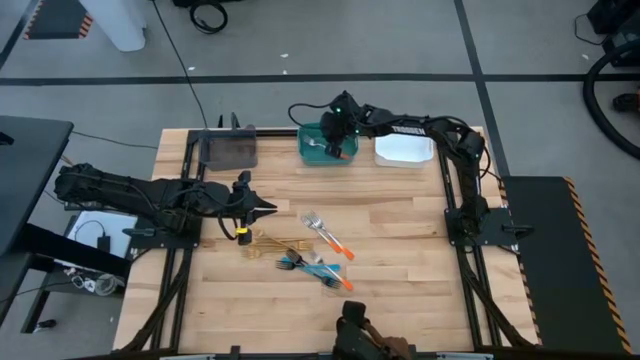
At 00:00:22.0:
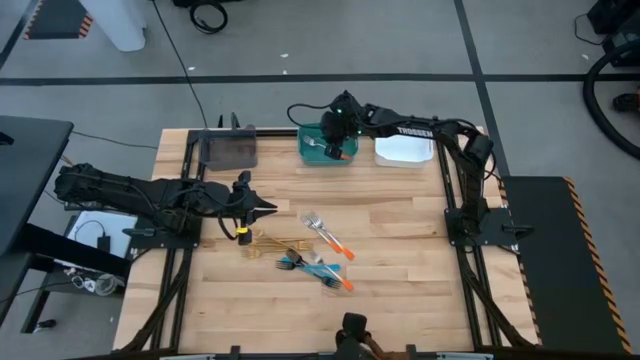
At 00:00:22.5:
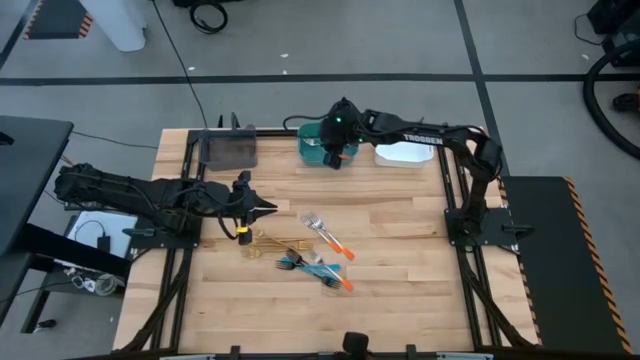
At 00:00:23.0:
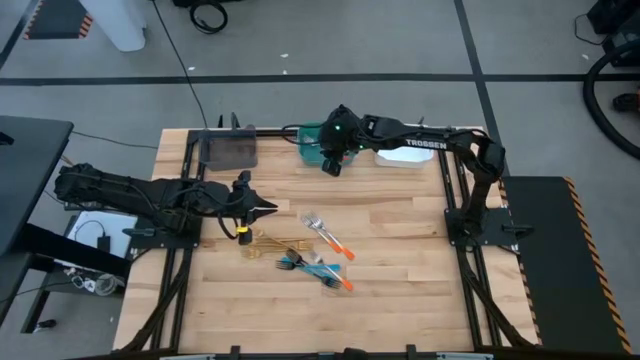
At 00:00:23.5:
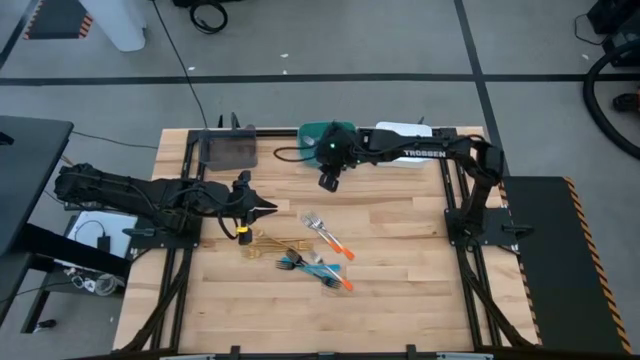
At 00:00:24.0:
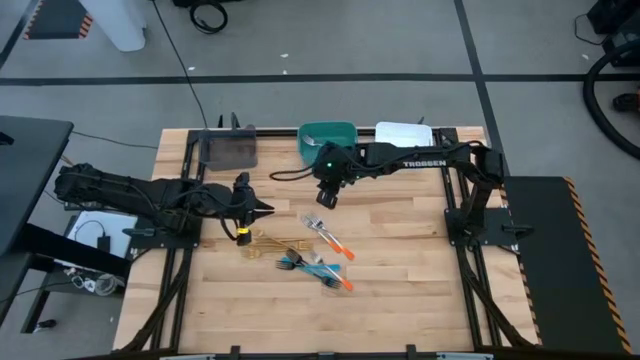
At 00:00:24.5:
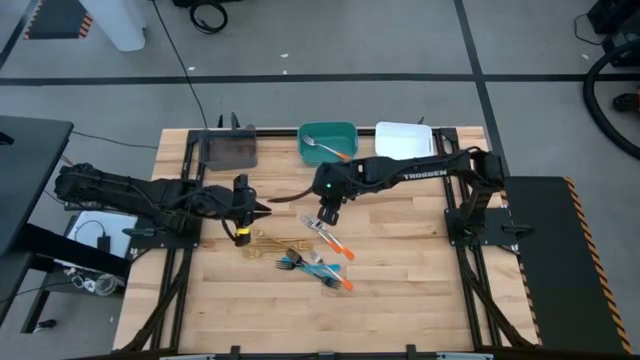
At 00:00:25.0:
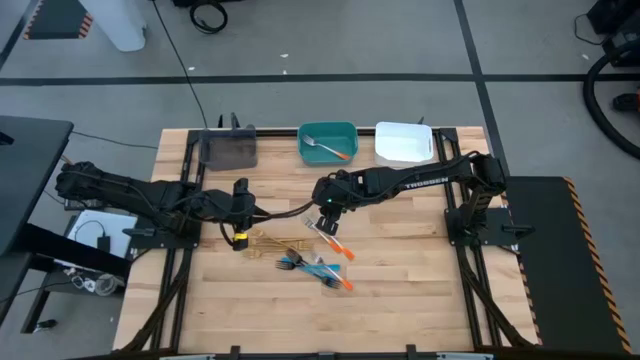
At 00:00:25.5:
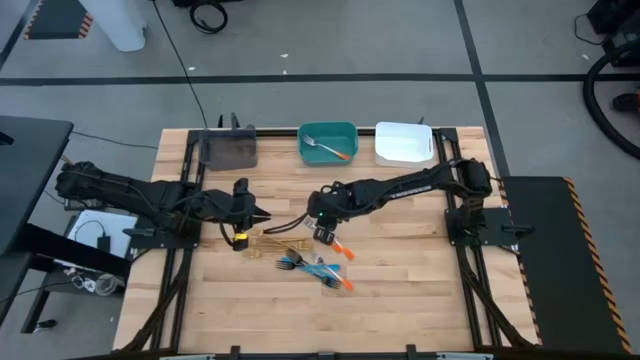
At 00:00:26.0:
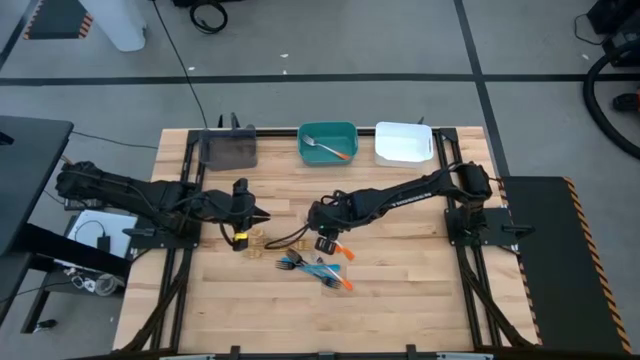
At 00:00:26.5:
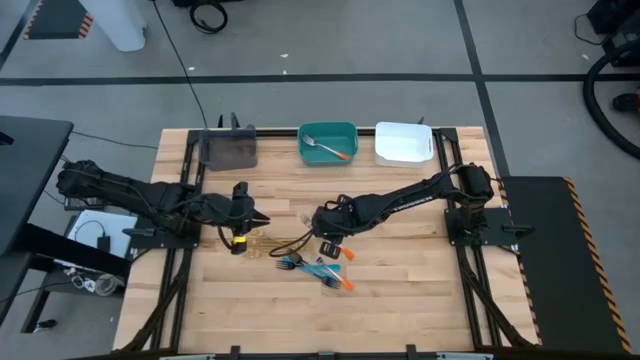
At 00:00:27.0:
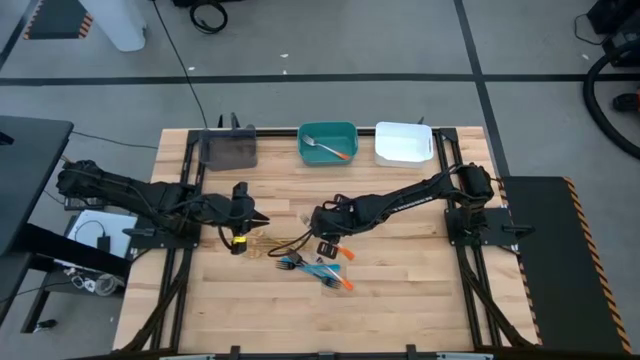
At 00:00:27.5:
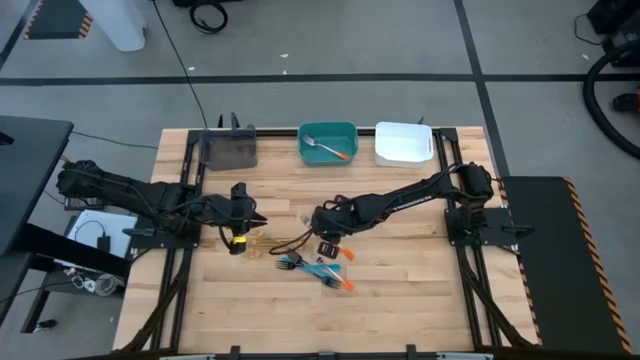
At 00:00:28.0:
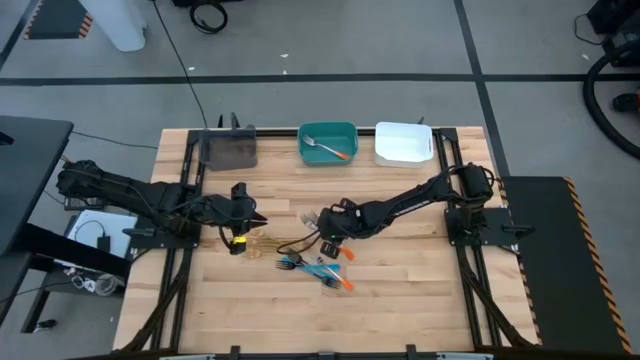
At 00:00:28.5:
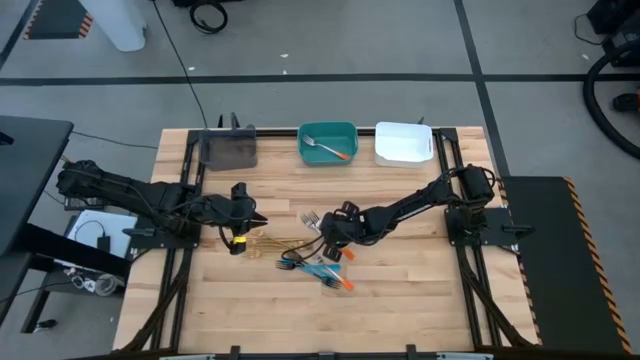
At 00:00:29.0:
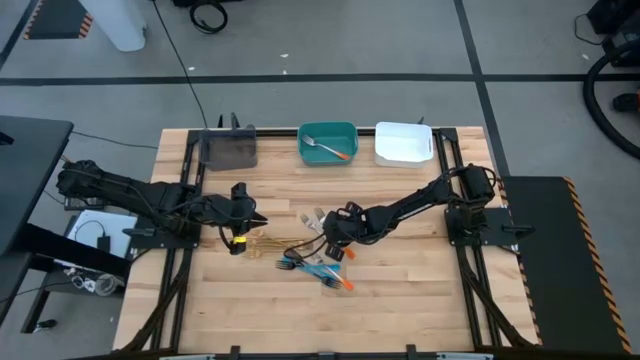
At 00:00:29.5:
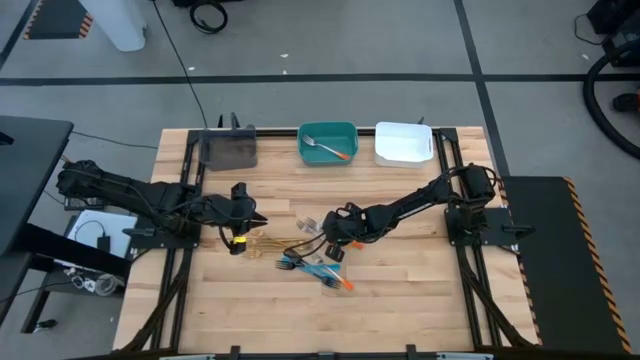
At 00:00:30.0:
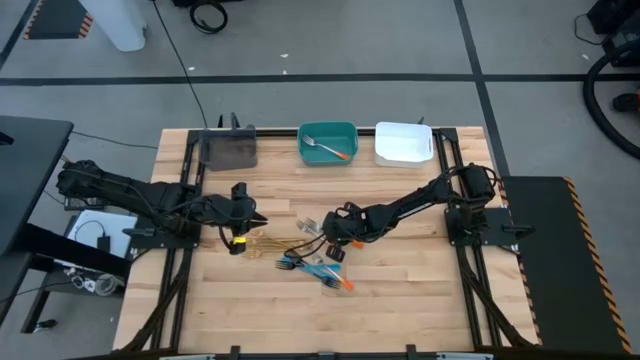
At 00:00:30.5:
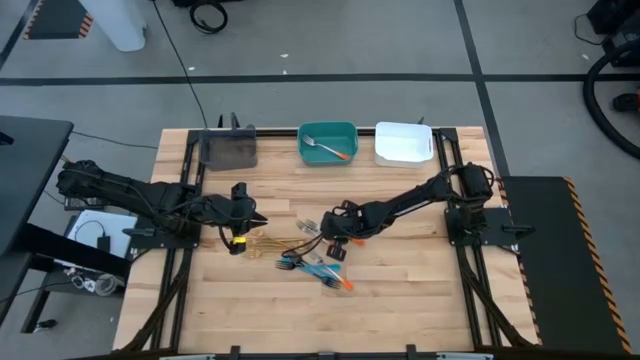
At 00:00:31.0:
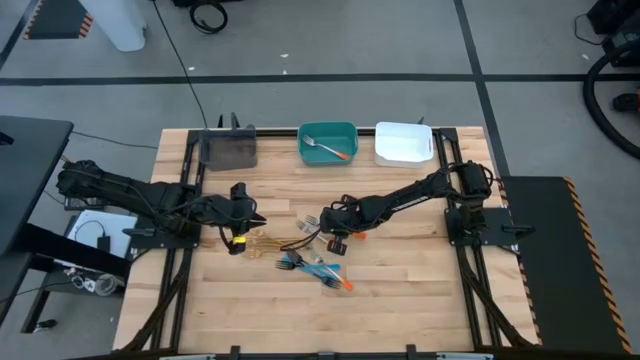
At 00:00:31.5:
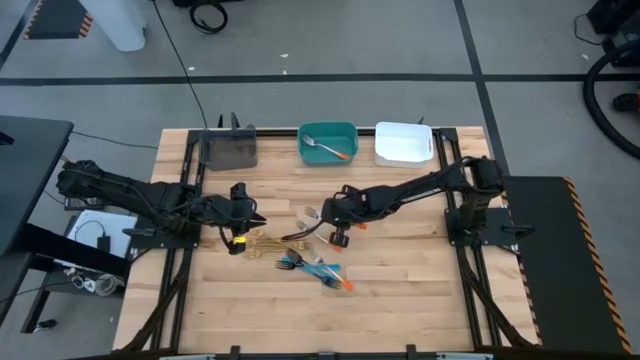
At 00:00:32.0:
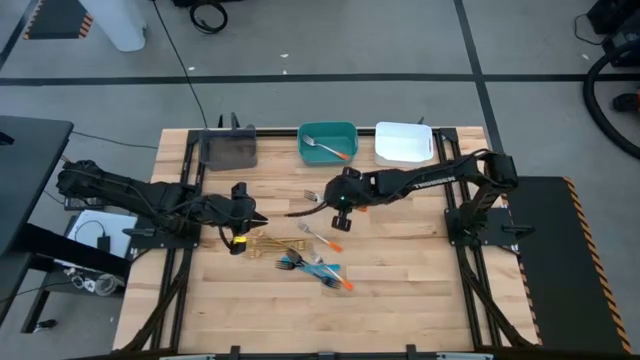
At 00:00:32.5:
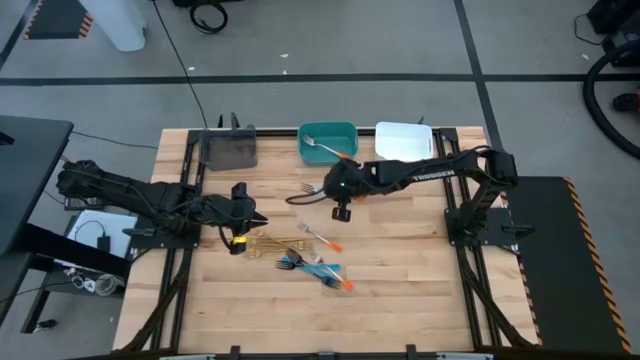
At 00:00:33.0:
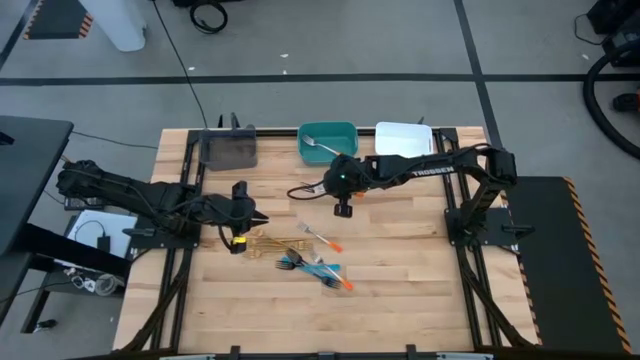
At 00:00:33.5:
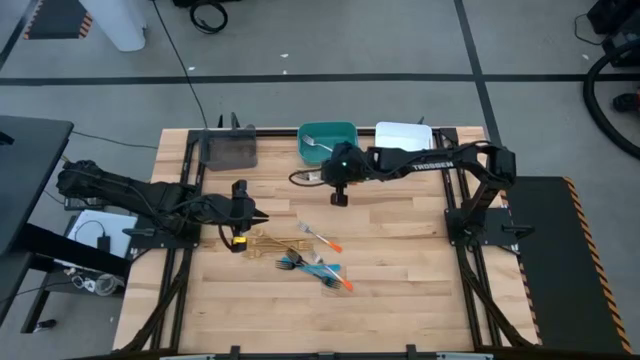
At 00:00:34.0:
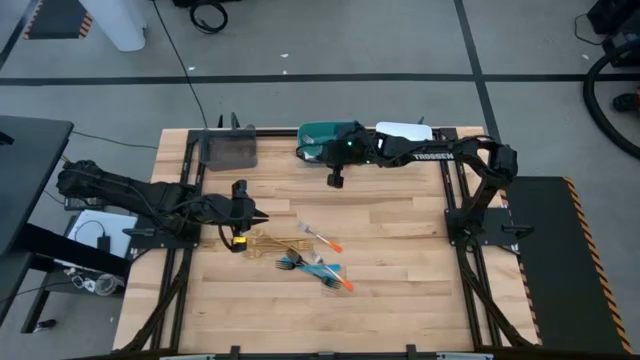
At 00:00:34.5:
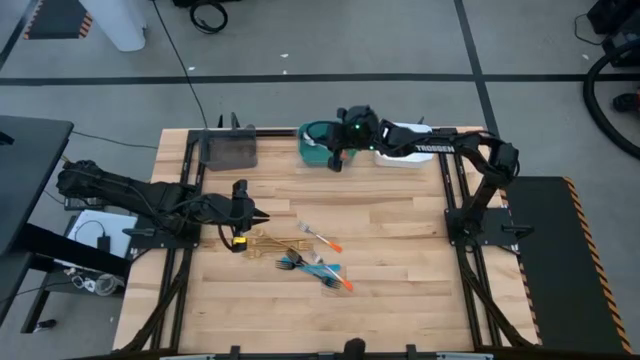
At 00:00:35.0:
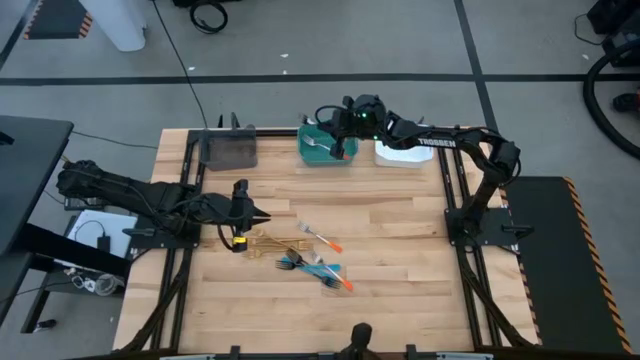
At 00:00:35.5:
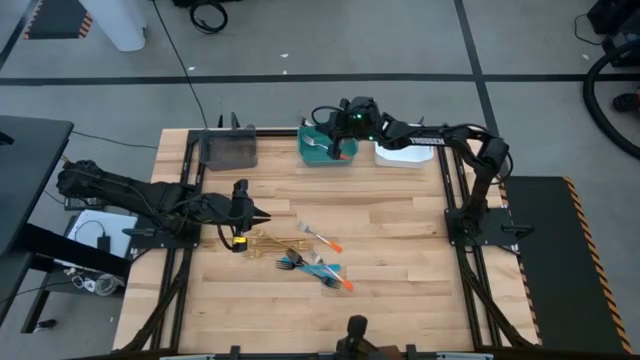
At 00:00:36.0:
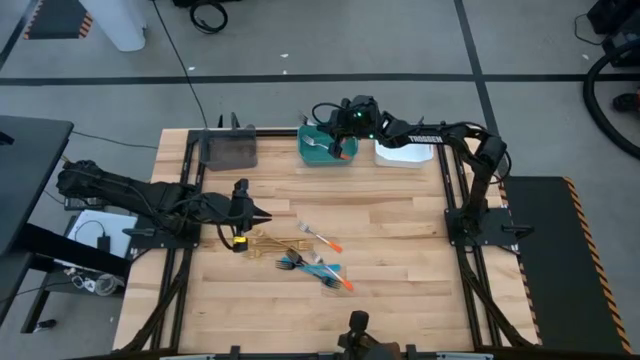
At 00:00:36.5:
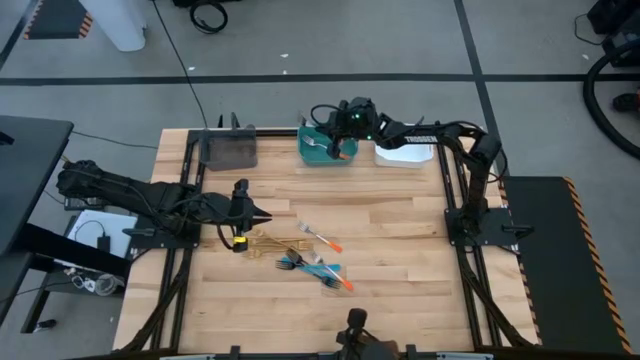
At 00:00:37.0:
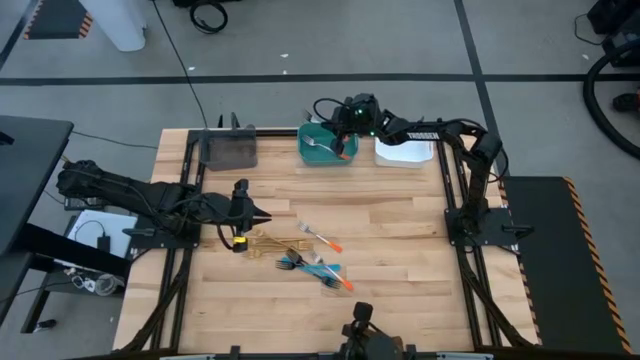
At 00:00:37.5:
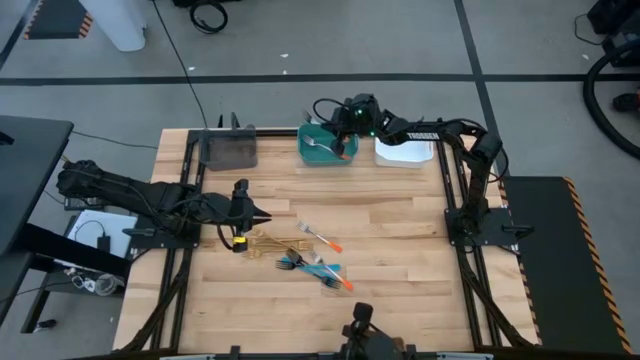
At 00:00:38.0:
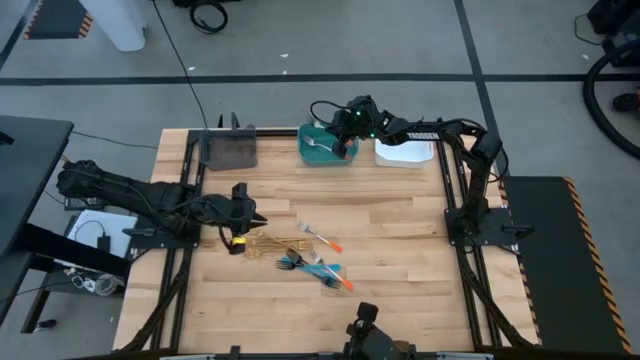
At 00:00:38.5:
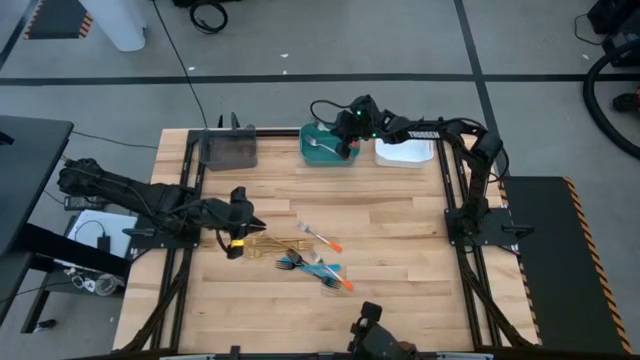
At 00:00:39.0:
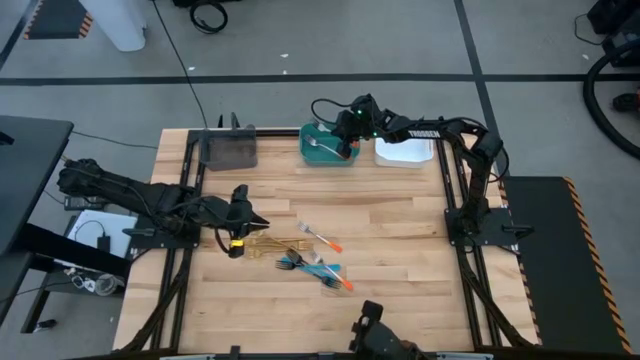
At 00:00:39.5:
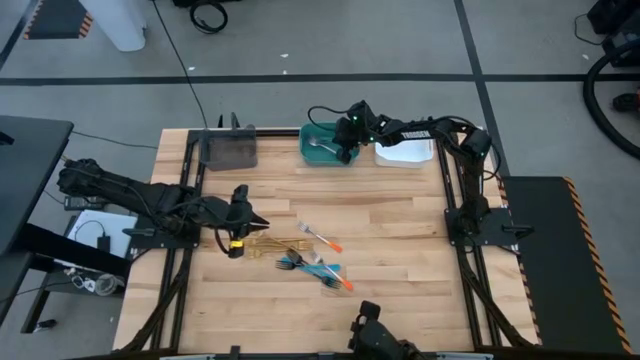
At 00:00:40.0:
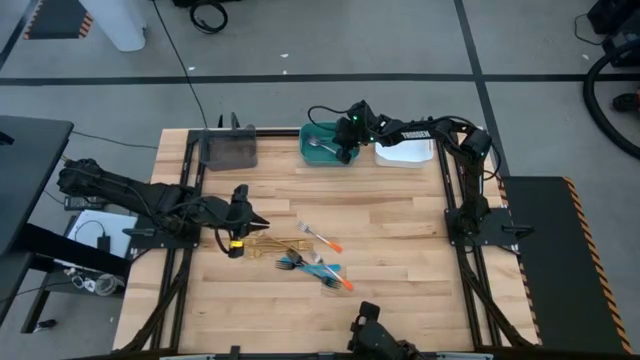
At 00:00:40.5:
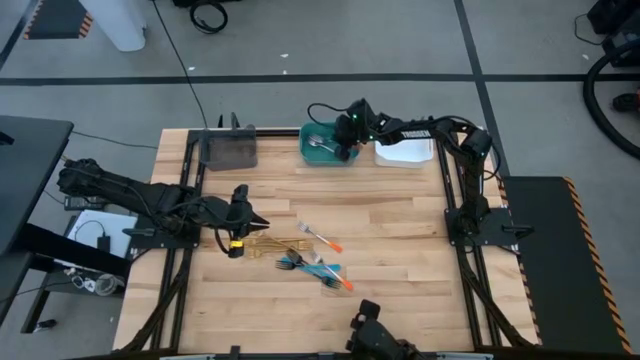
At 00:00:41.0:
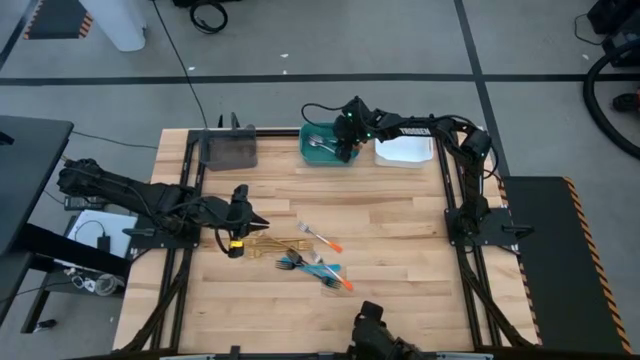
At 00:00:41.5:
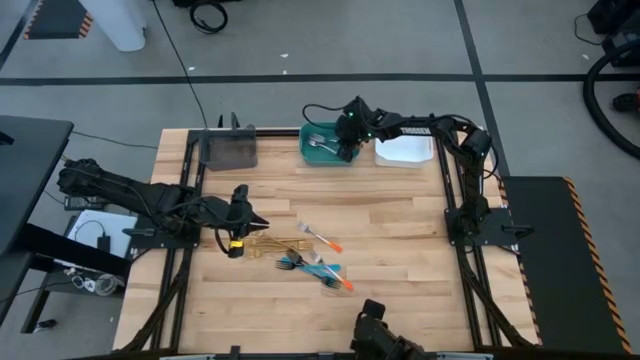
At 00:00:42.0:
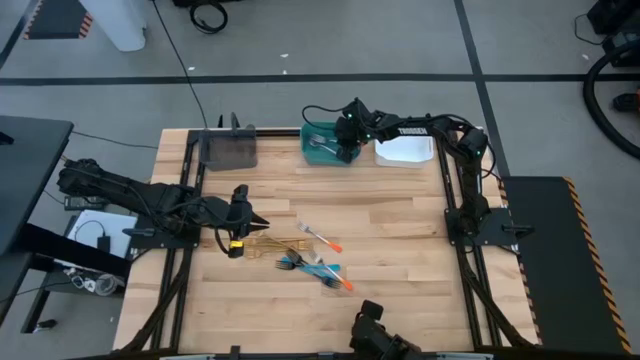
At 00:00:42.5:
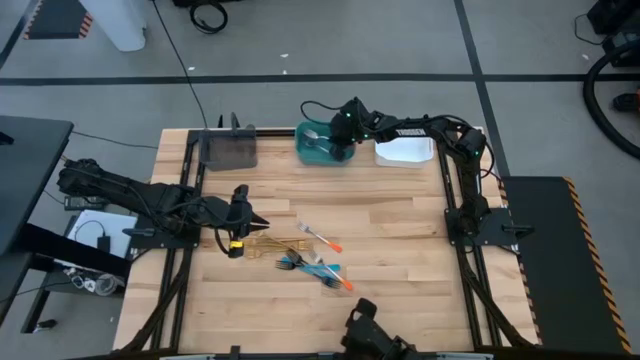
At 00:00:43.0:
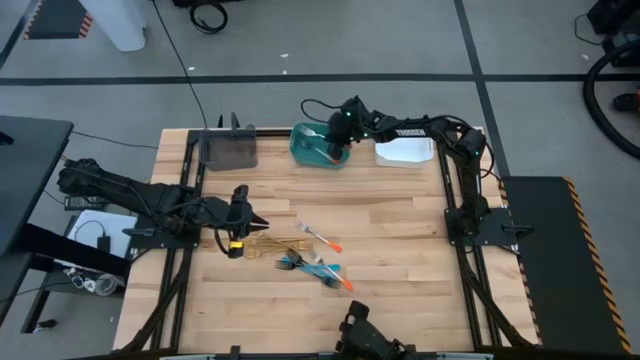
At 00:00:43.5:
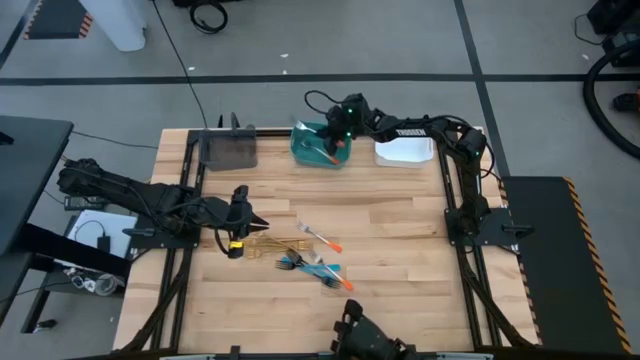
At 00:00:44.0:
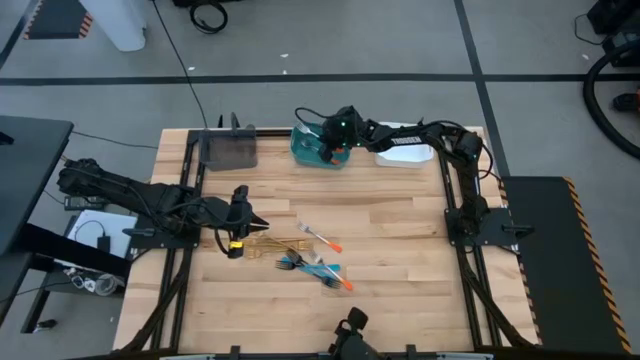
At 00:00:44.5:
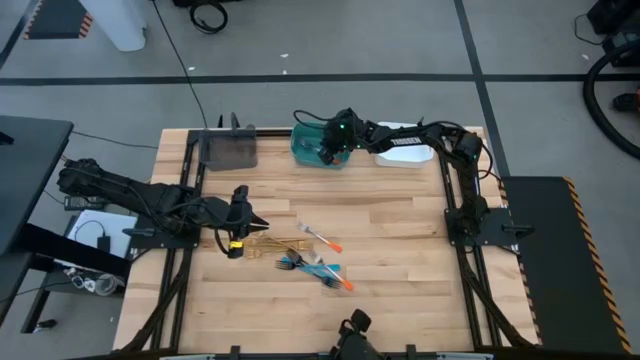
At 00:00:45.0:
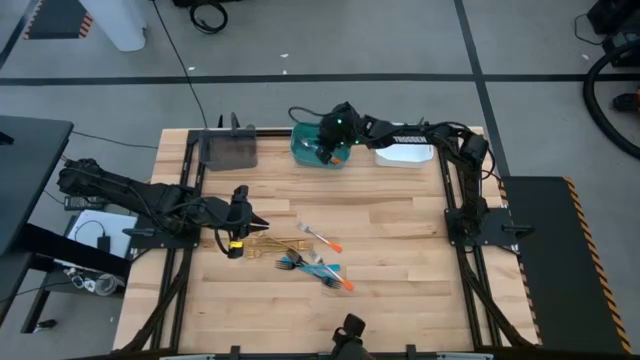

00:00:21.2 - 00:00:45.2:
Task: Sort silverware by color (type)
Put the orange fork into the blue bin
